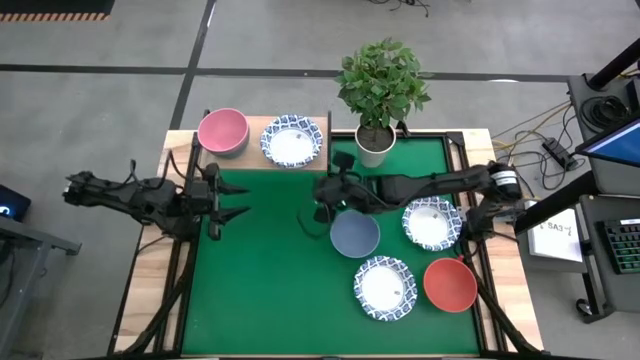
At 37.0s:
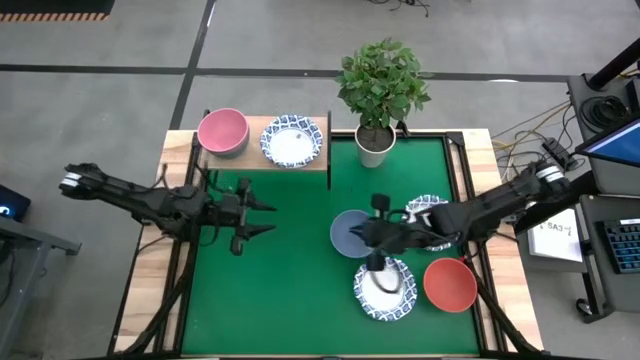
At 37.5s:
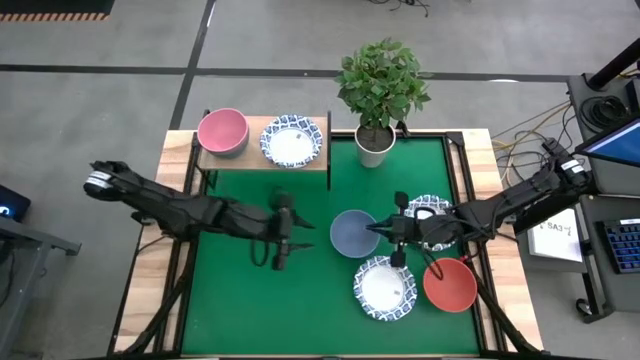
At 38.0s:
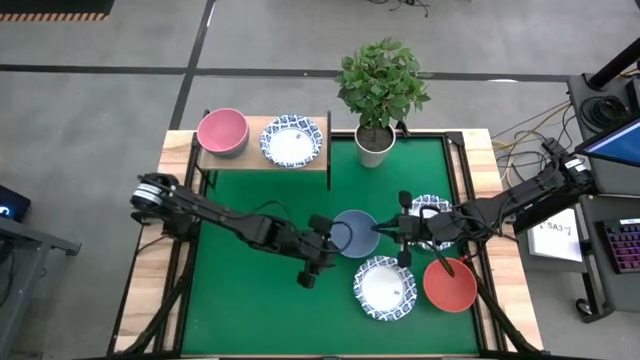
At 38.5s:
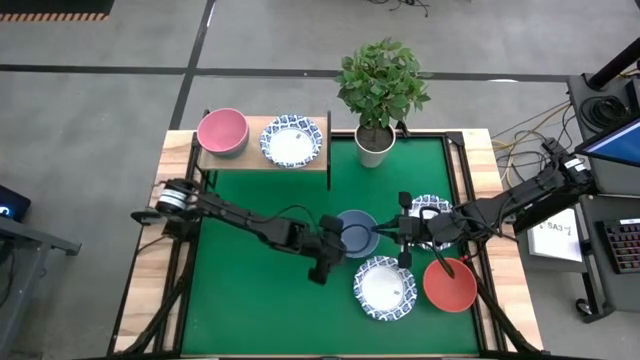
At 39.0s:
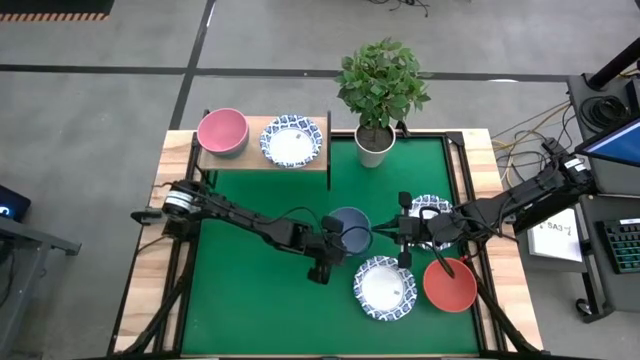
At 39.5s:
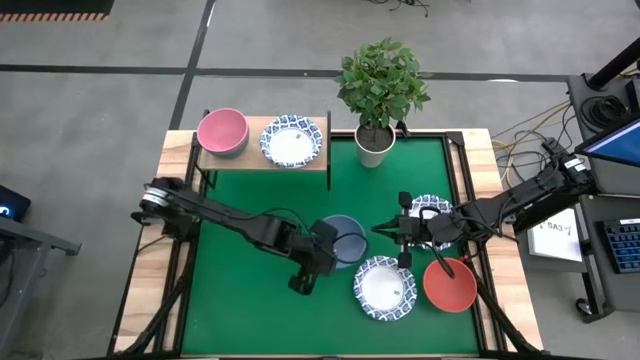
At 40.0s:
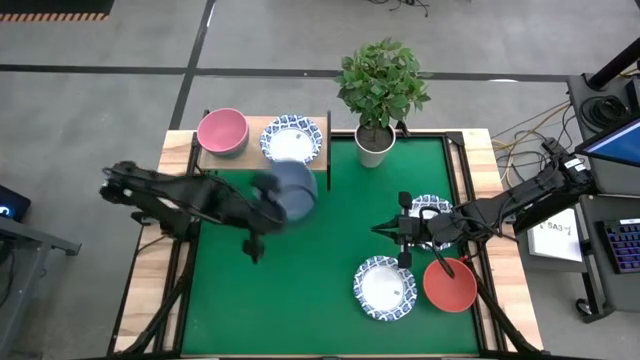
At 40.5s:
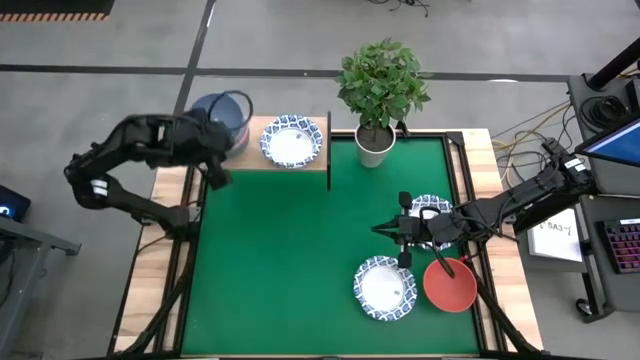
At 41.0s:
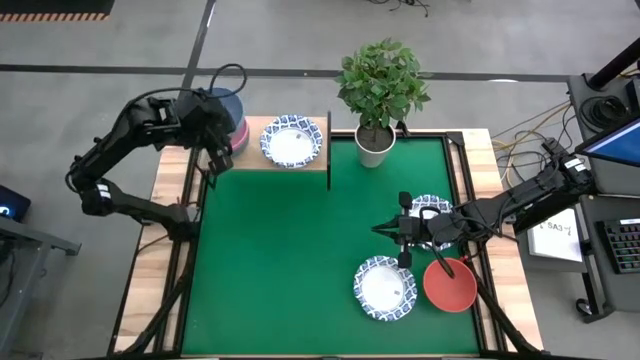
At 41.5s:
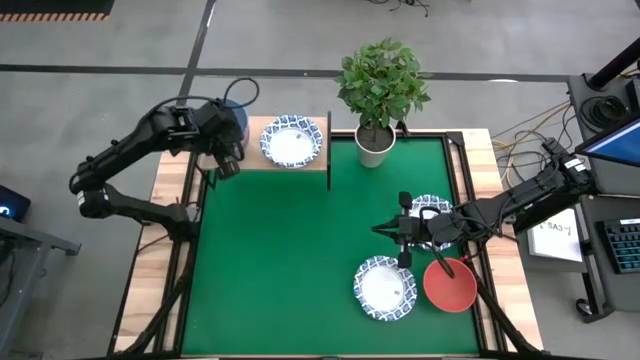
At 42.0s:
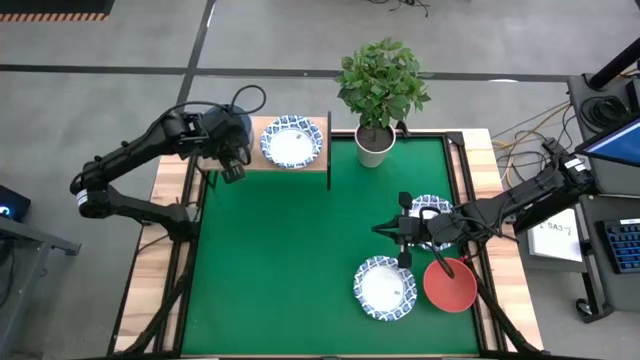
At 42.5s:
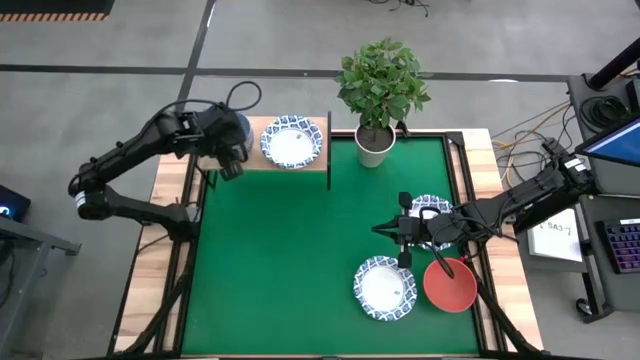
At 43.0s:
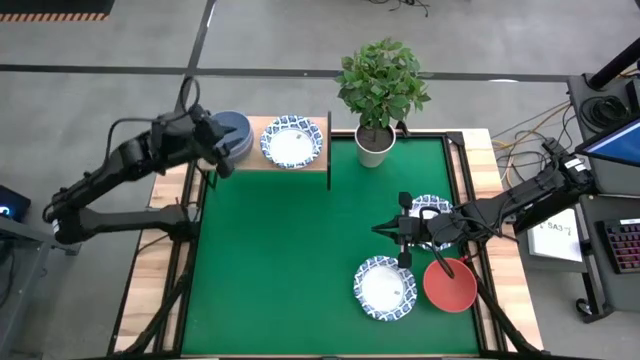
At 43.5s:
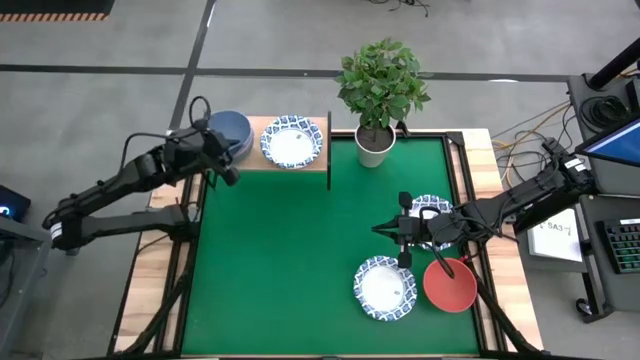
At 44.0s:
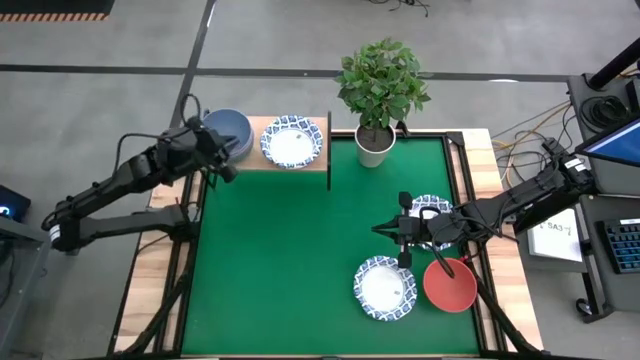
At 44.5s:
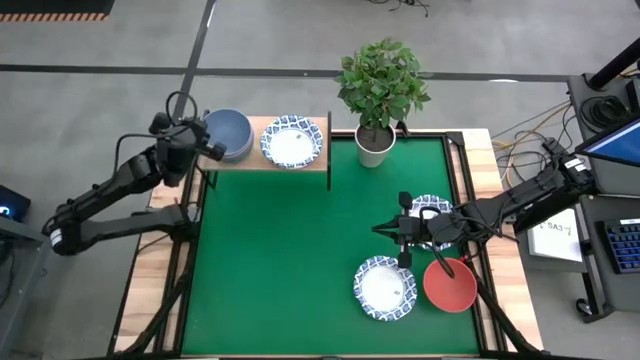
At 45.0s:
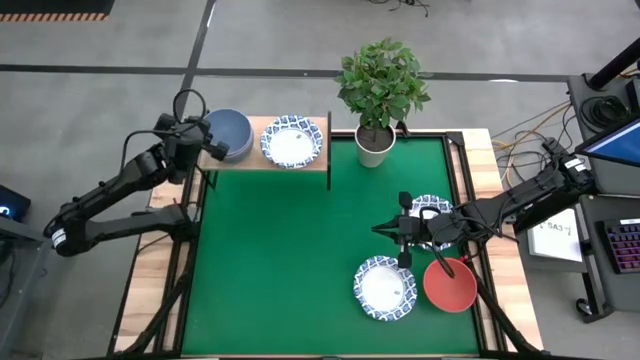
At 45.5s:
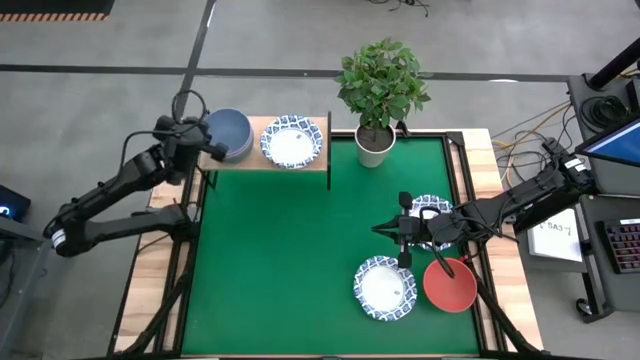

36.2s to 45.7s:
Task: Place and stack bowls onto a shelf
Stack the blue bowl on top of the pink bowl on the shelf

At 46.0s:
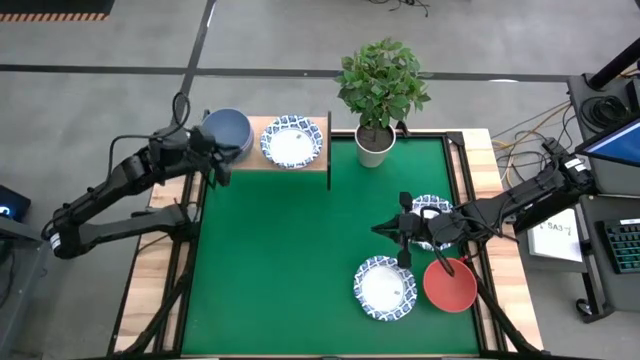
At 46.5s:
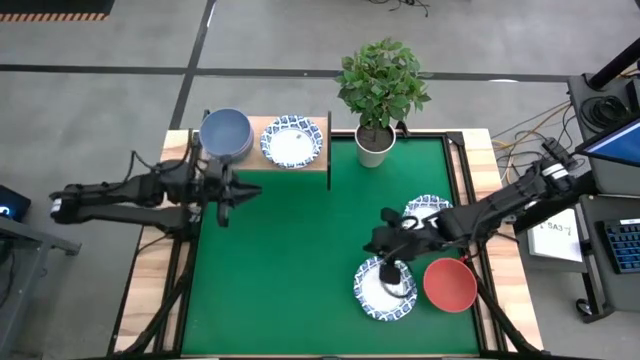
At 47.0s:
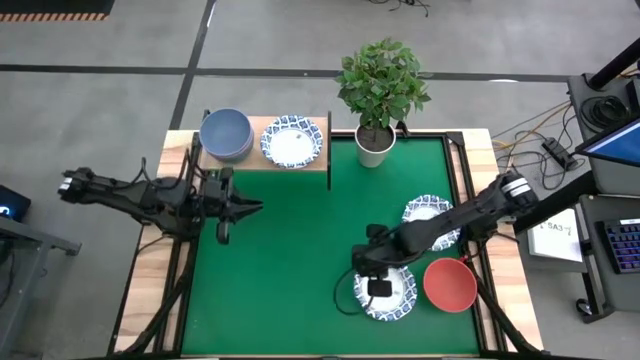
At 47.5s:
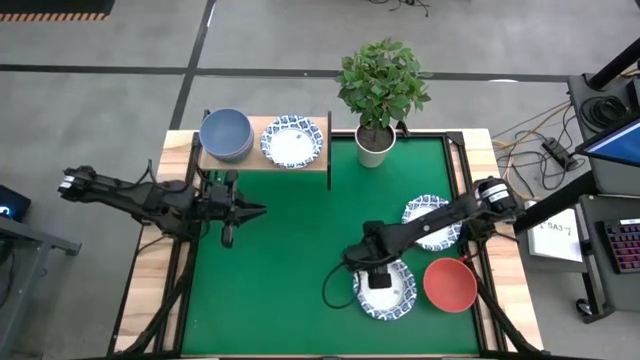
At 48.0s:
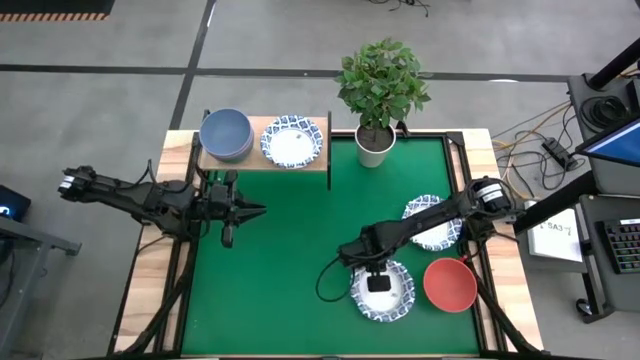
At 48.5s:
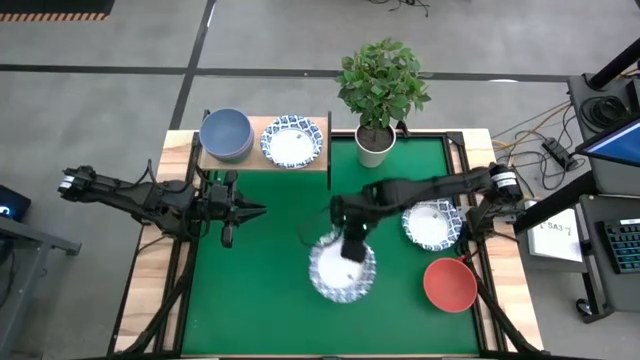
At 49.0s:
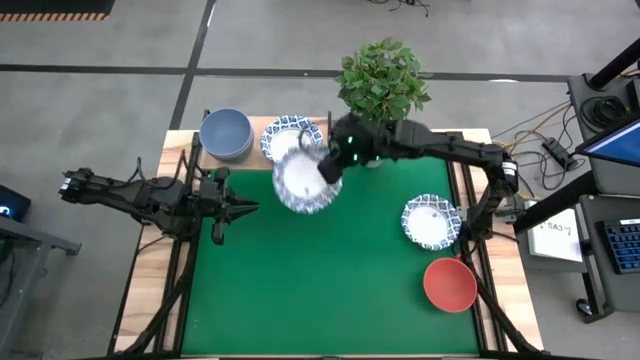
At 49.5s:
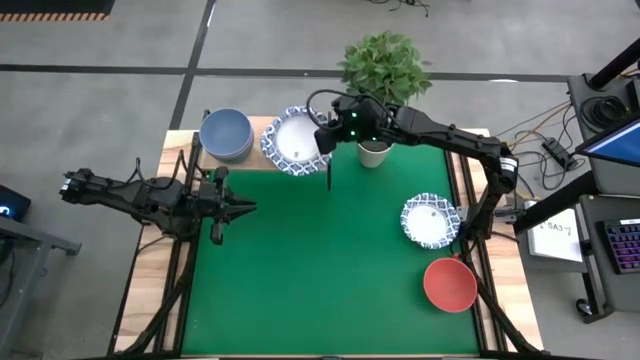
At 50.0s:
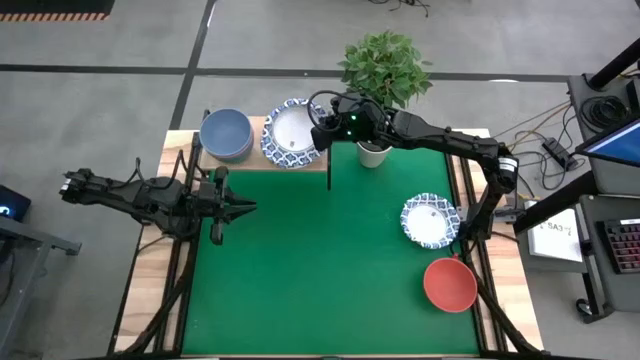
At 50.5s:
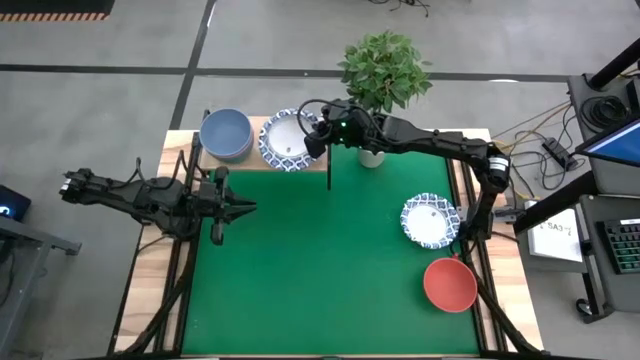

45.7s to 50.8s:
Stack the white patterned bowl on top of the white patterned bowl on the shelf

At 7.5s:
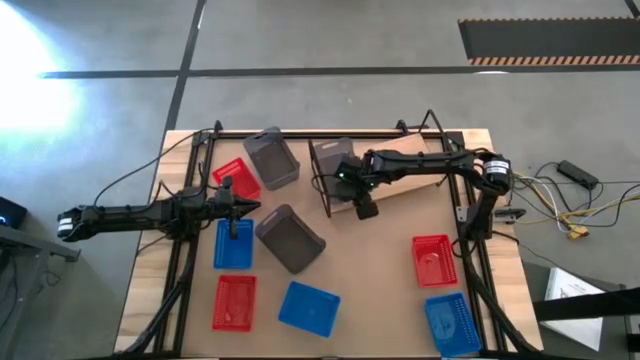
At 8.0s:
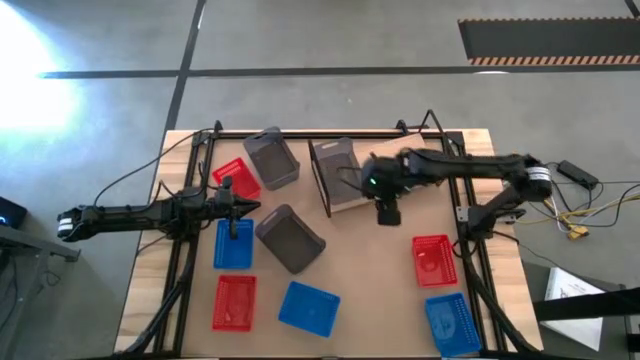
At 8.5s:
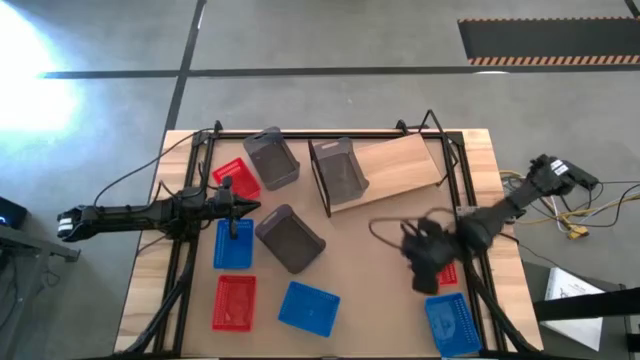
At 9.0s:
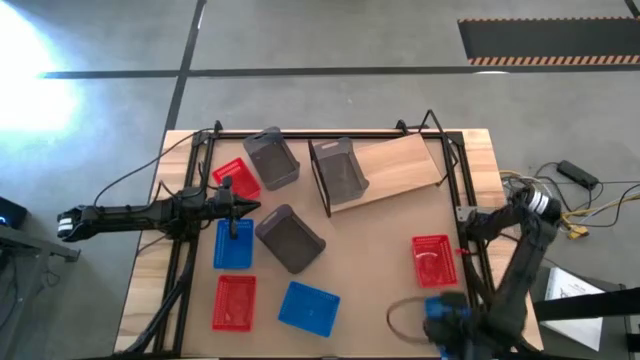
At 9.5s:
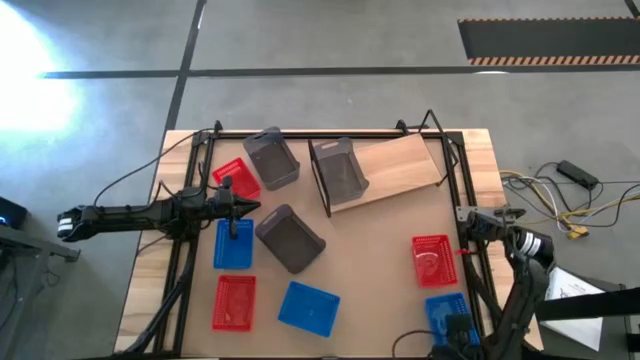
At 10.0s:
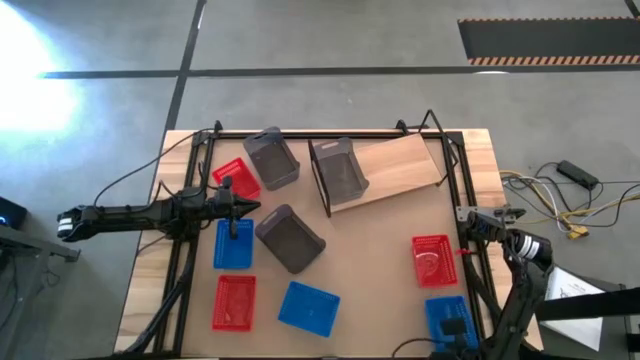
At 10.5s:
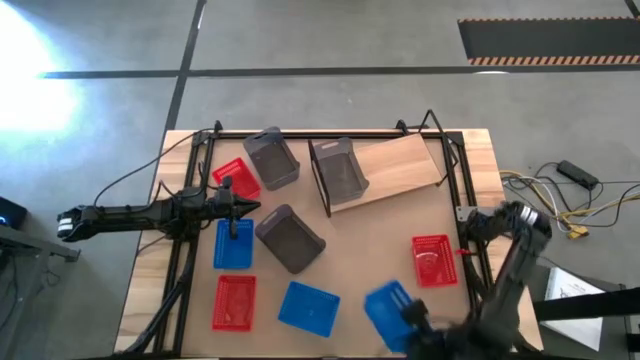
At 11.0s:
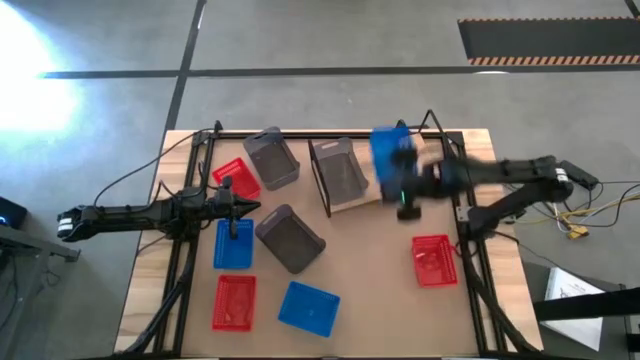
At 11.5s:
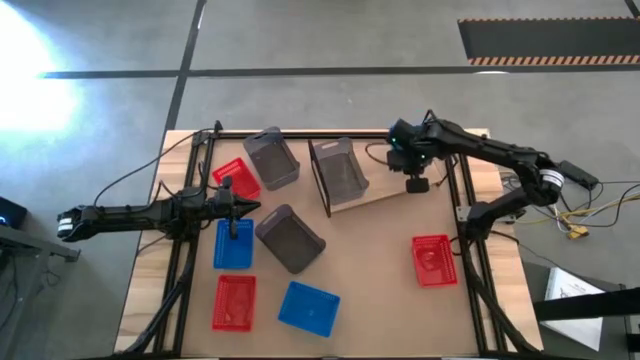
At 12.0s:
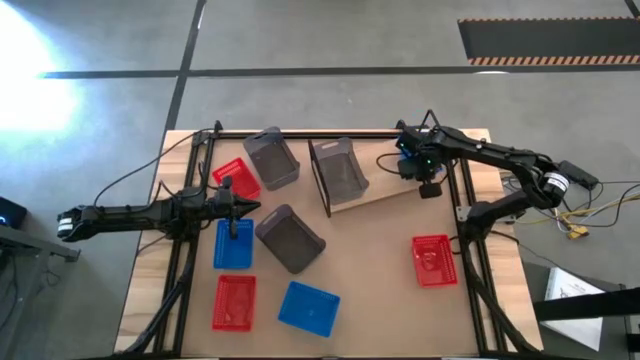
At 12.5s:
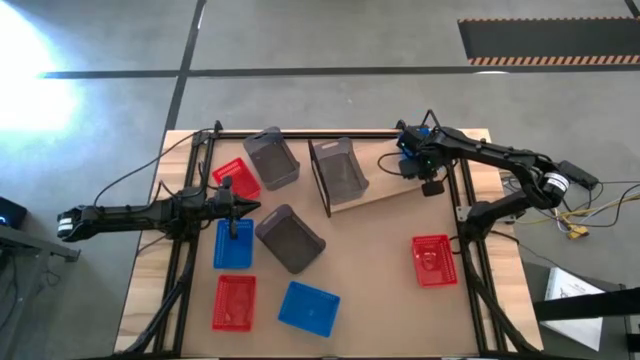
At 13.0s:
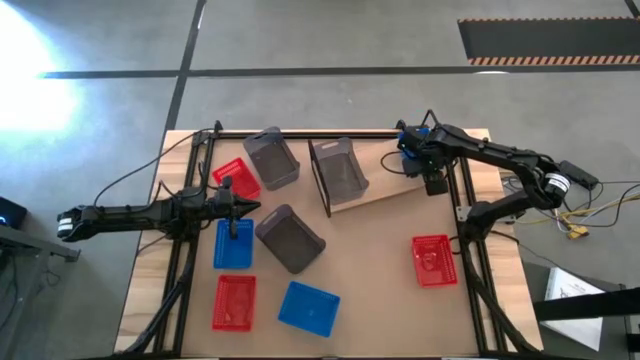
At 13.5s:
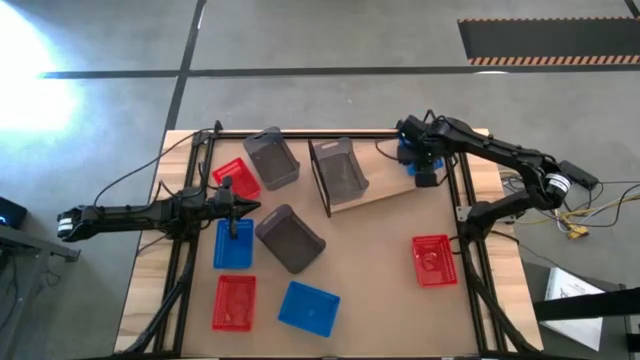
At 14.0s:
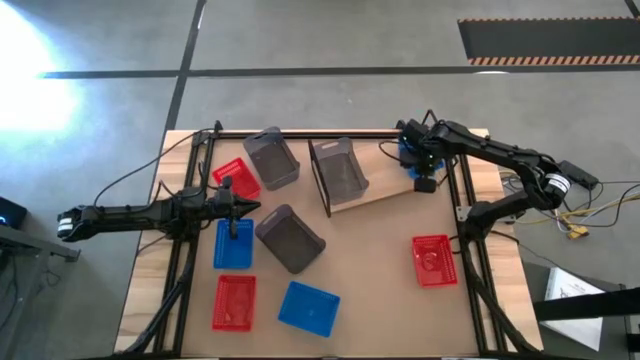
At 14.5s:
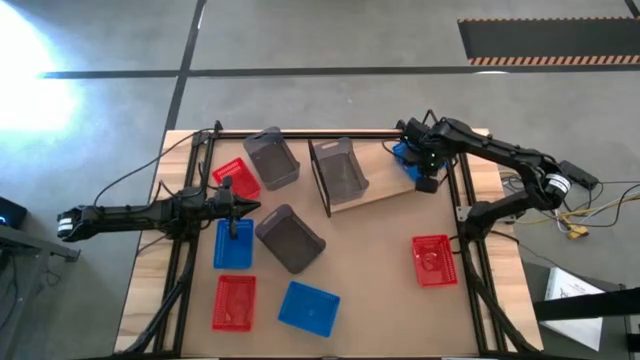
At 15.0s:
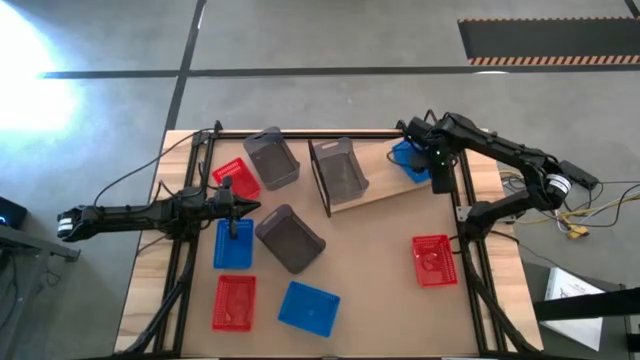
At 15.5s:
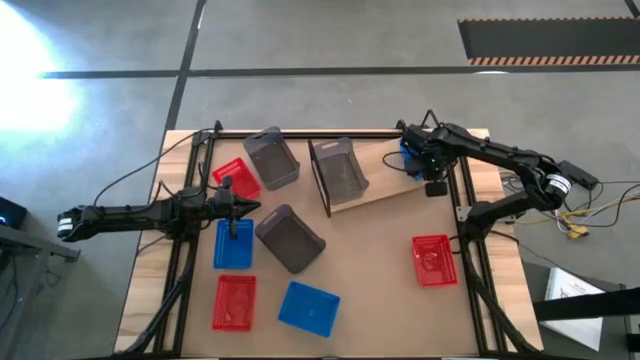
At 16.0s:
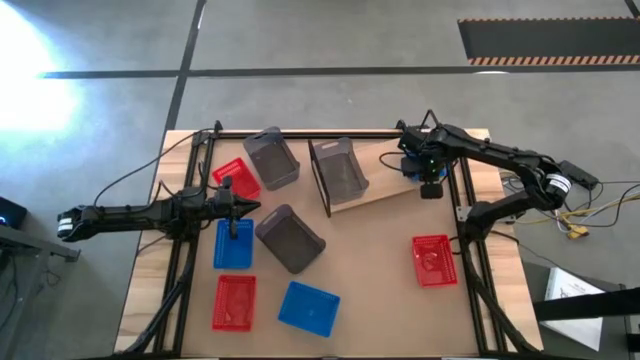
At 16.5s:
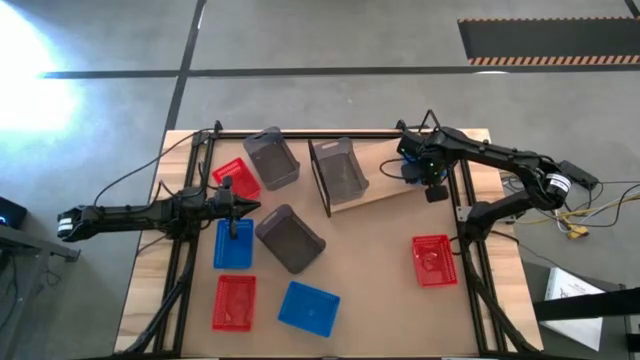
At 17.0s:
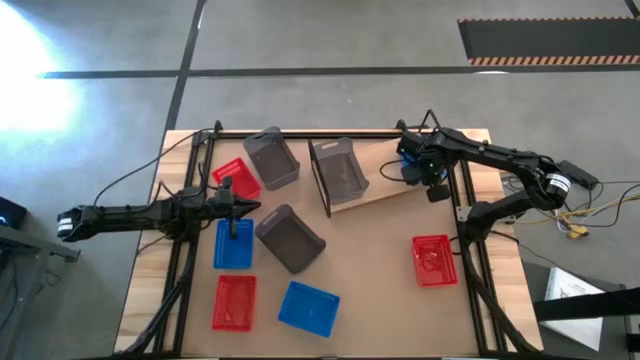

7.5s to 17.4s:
Task: Stack baskets on shelf by color
Put the bottom right blue bin on the shelf
